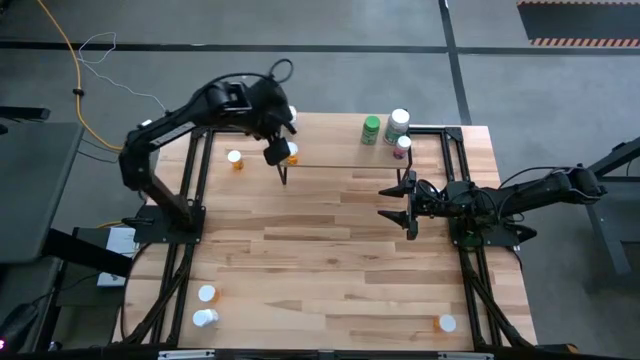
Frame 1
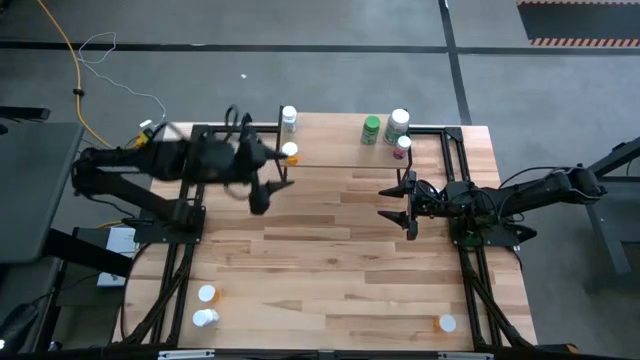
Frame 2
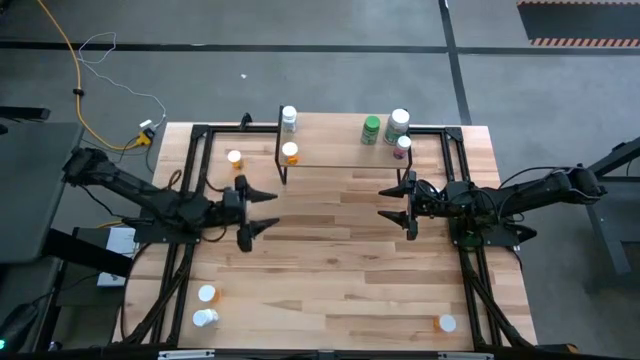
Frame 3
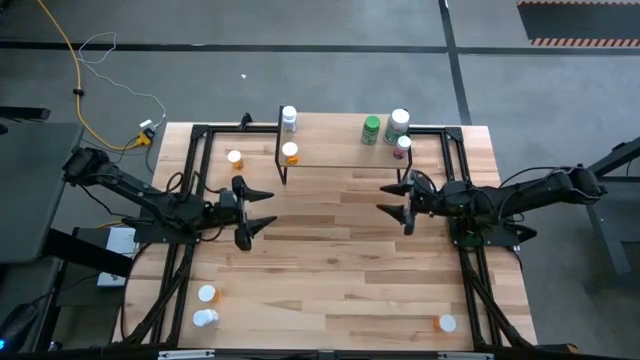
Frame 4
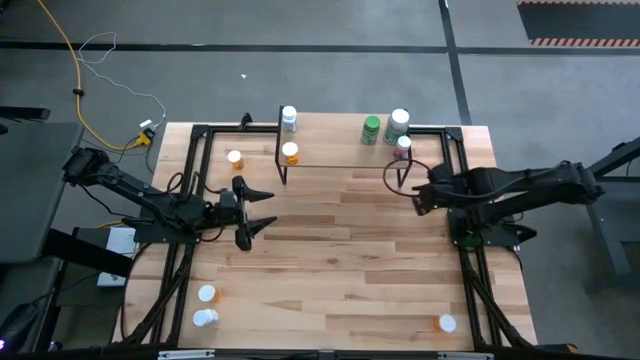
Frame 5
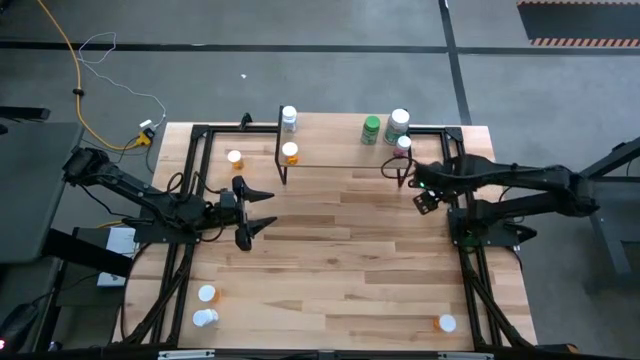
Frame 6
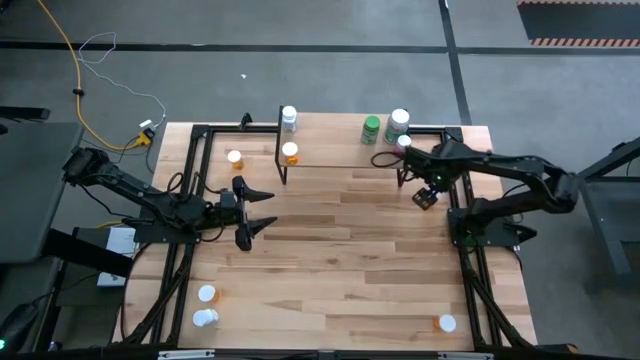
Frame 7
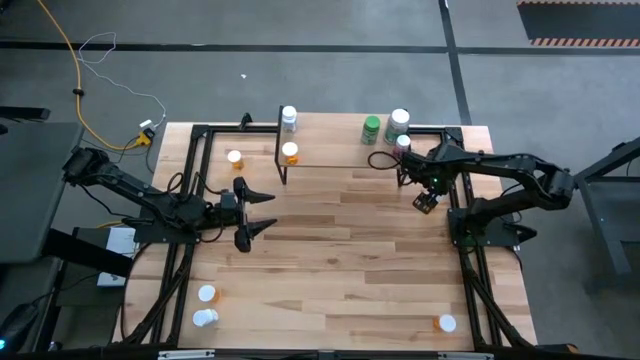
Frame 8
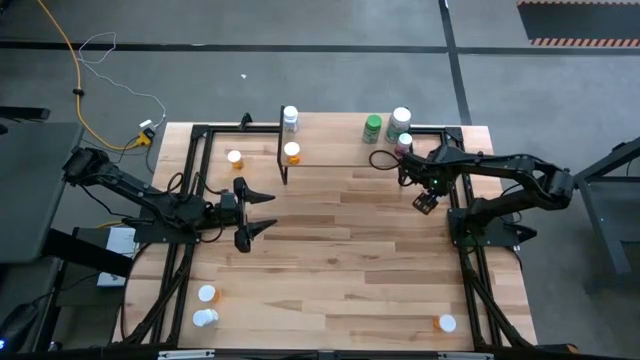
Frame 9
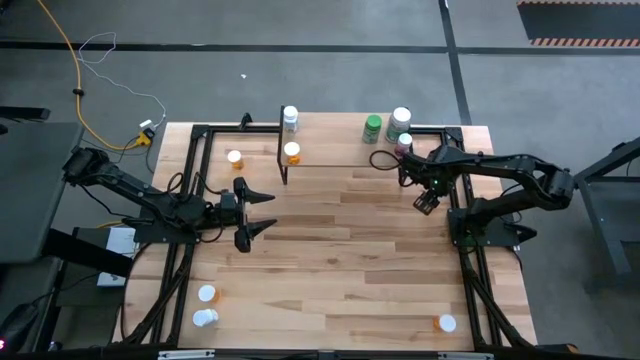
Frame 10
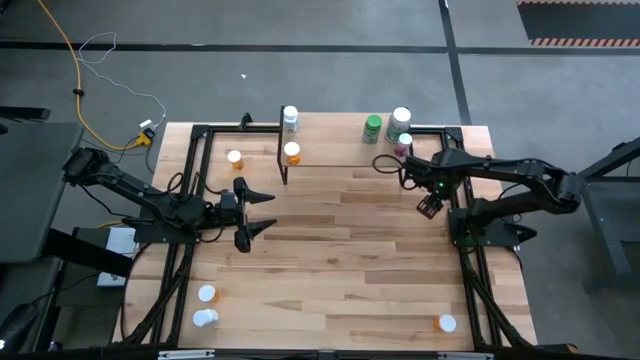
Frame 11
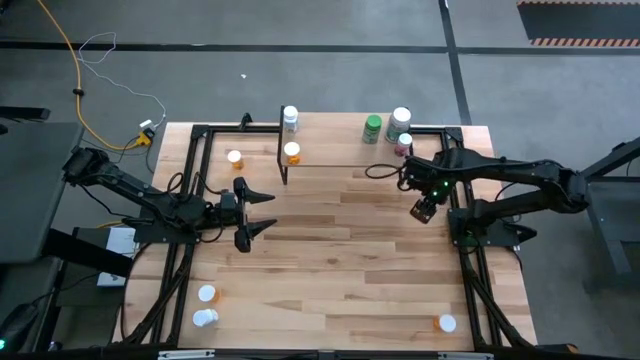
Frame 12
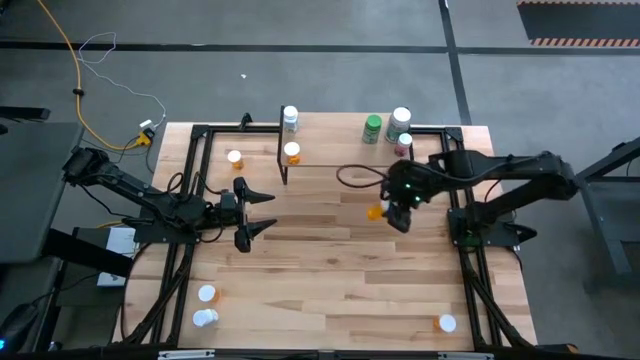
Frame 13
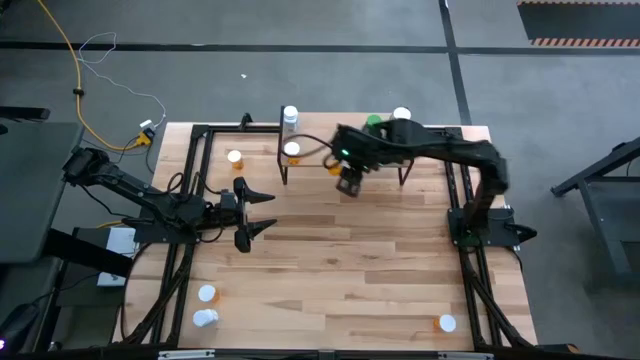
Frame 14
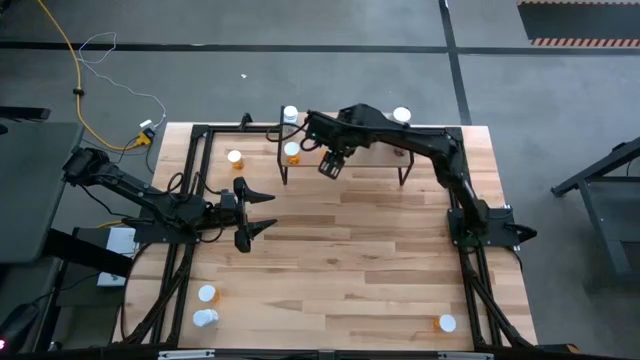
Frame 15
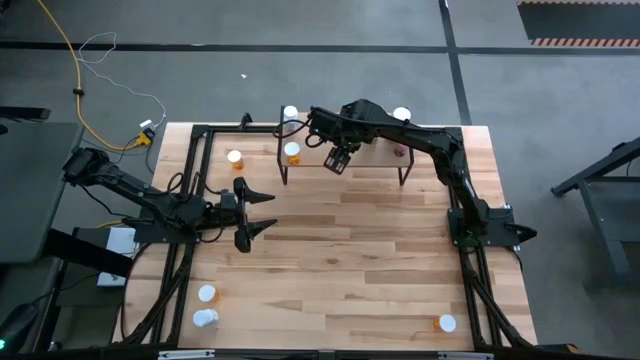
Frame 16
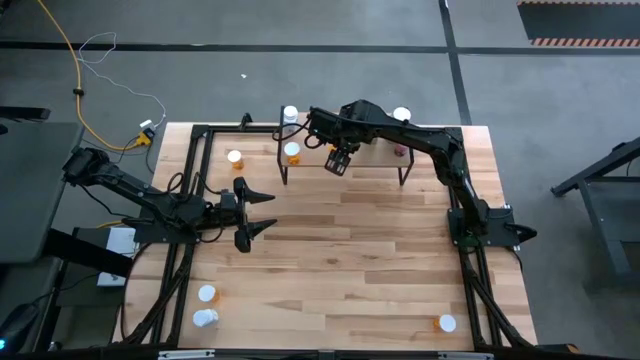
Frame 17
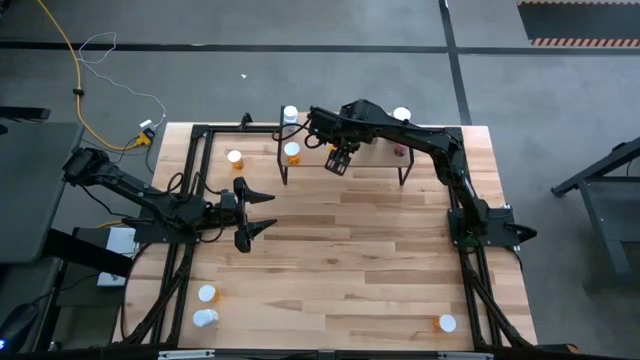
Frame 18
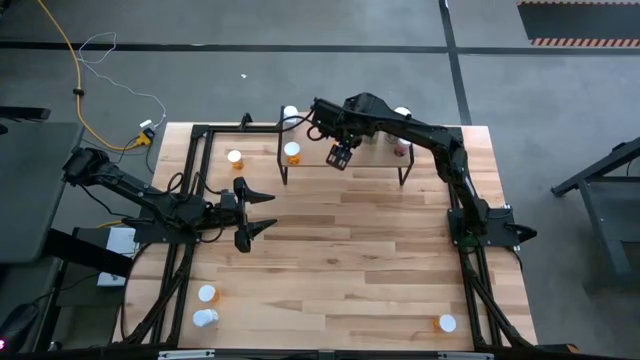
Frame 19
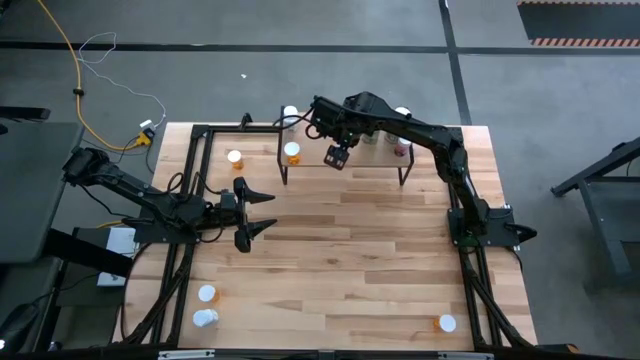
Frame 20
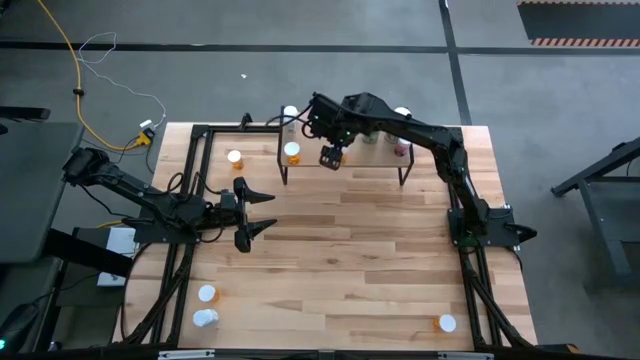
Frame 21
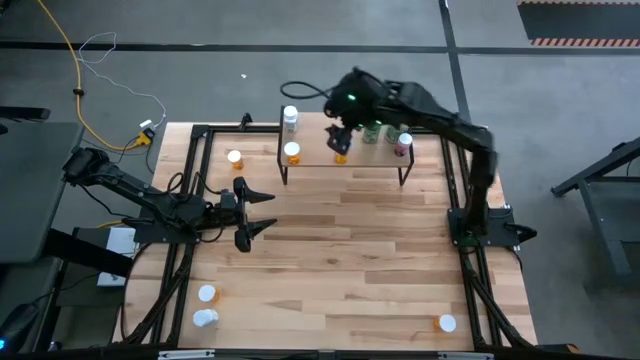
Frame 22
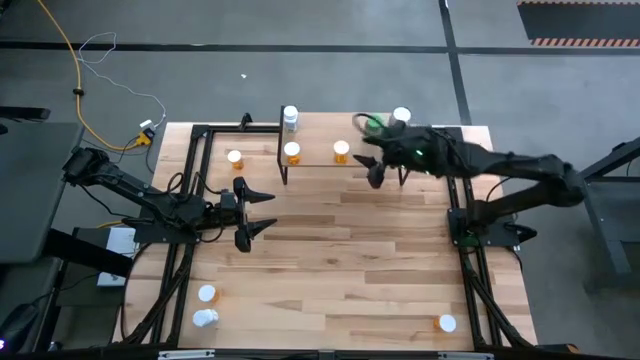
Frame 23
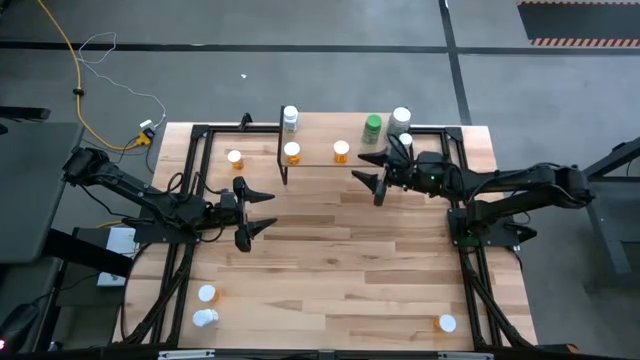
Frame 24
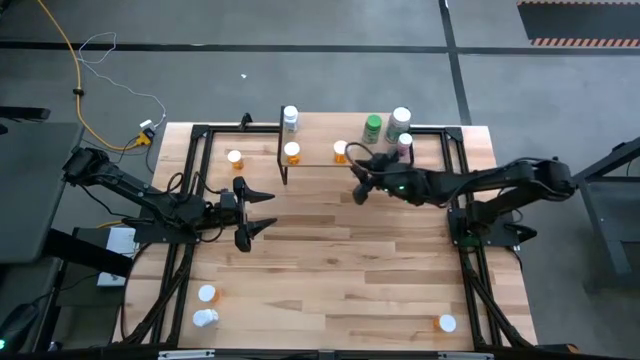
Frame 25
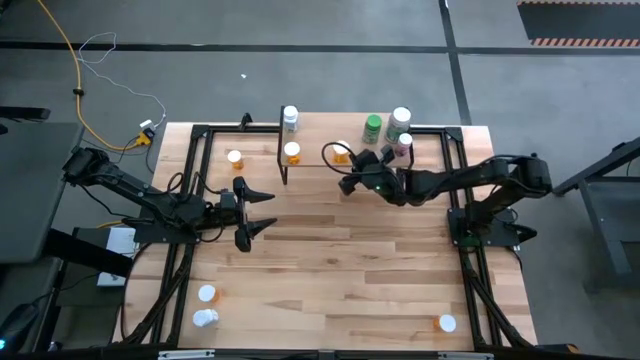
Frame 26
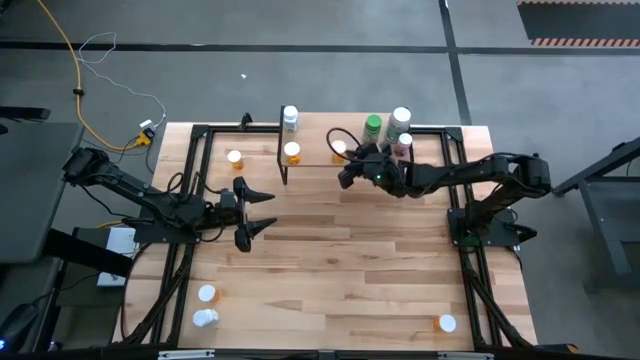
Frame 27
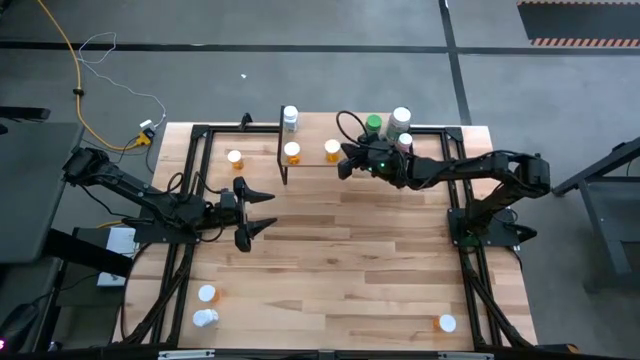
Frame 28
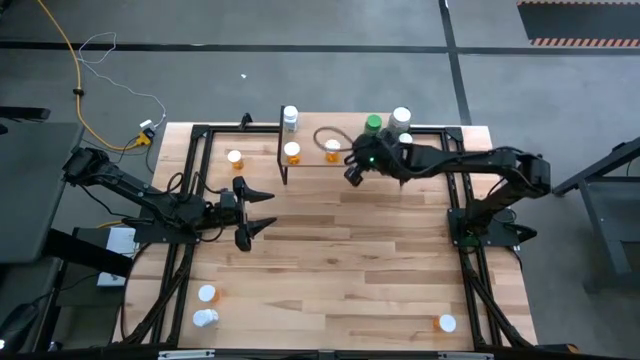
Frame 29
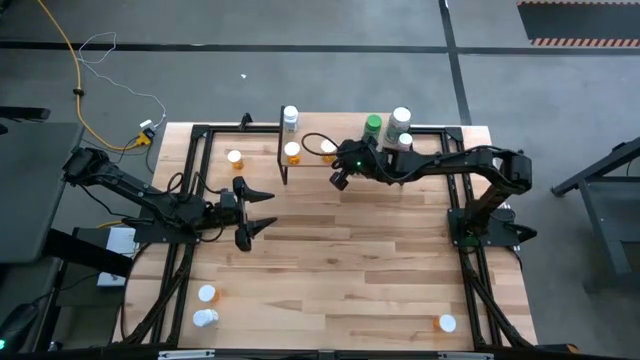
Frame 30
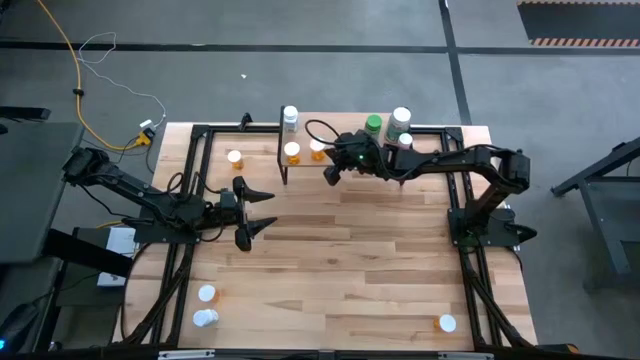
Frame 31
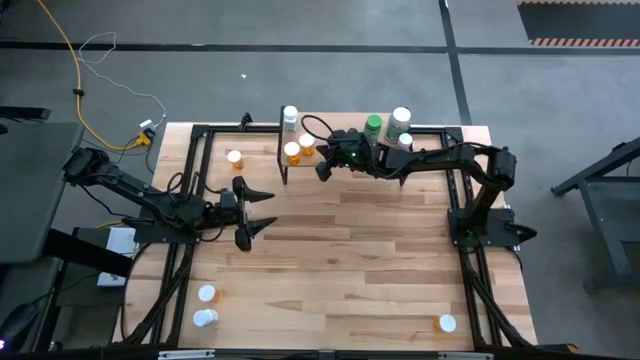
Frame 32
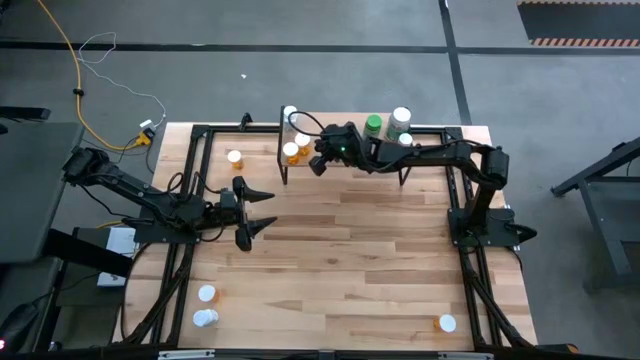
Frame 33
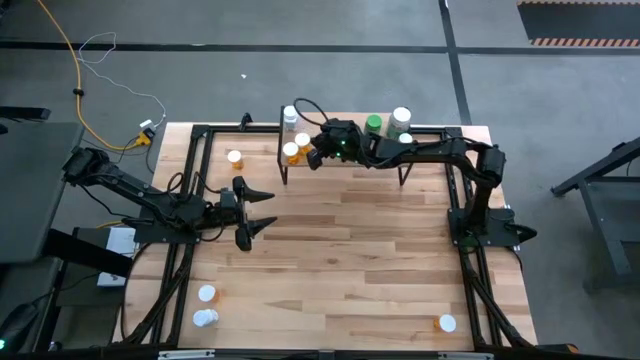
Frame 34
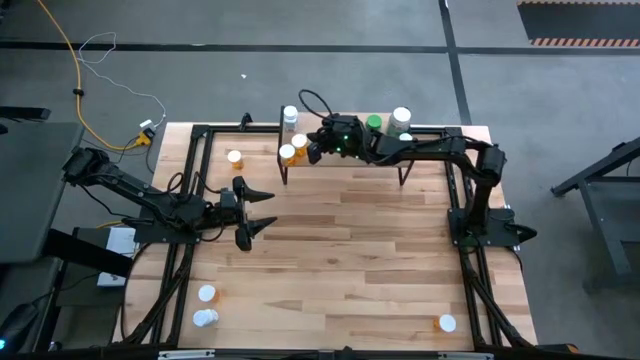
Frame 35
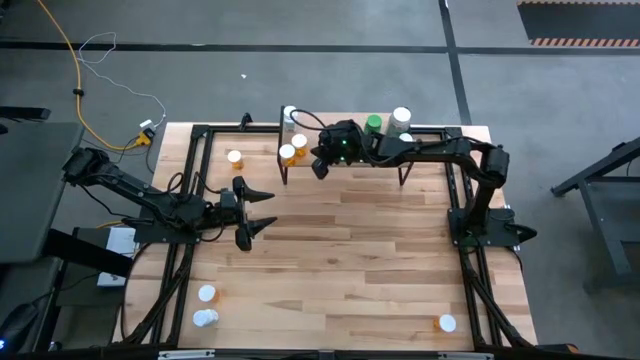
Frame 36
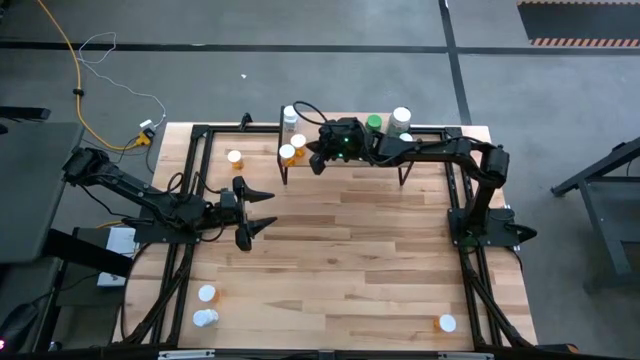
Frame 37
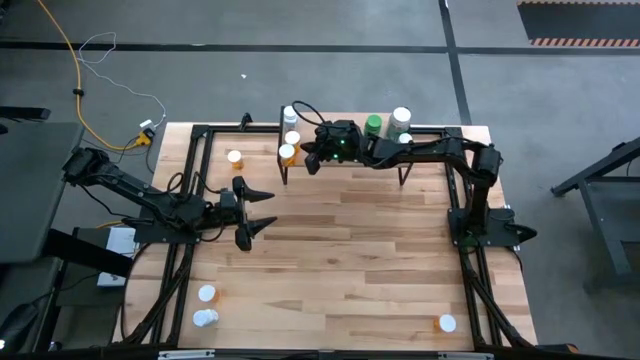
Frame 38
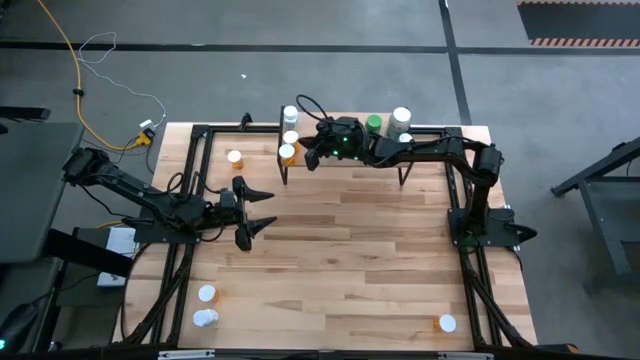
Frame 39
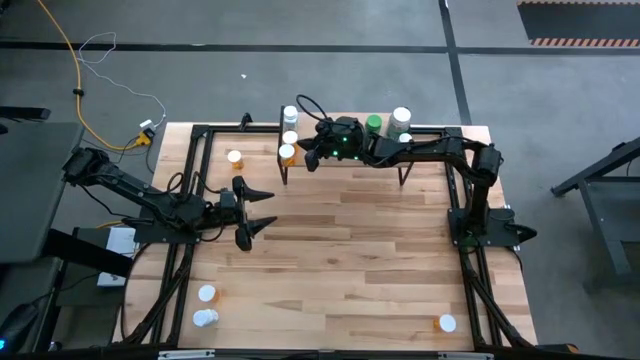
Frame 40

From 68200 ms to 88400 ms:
Task: Pick and place medicine bottles onto shelf by color
Put the orange pill bottle on the shelf

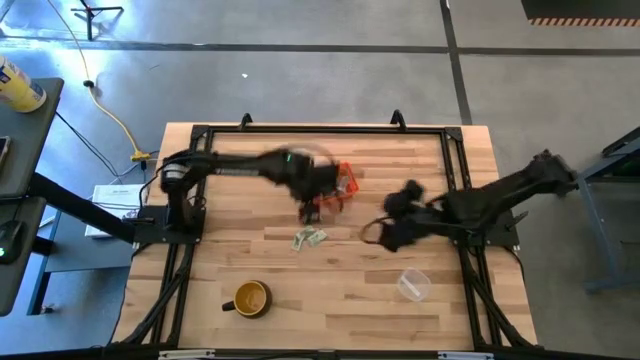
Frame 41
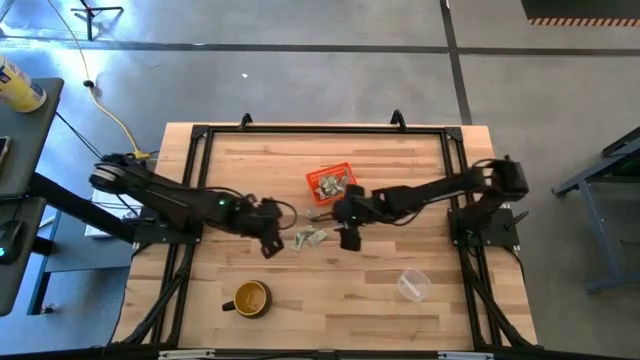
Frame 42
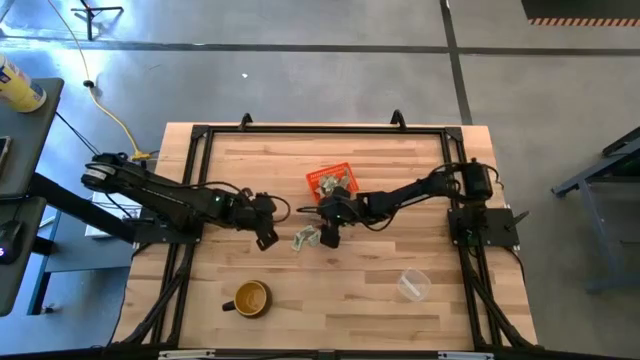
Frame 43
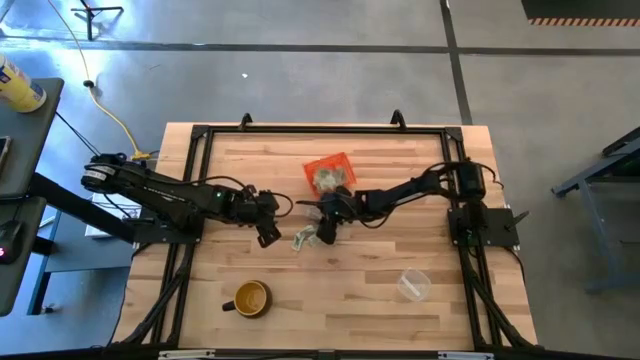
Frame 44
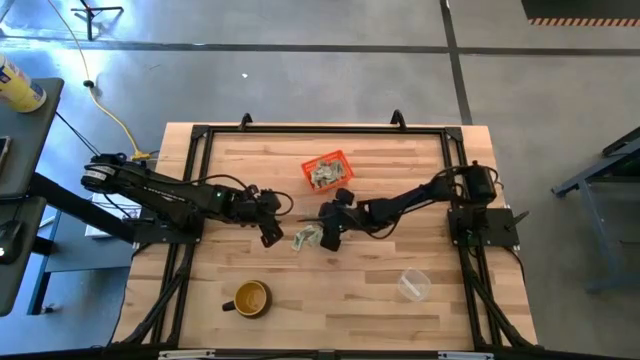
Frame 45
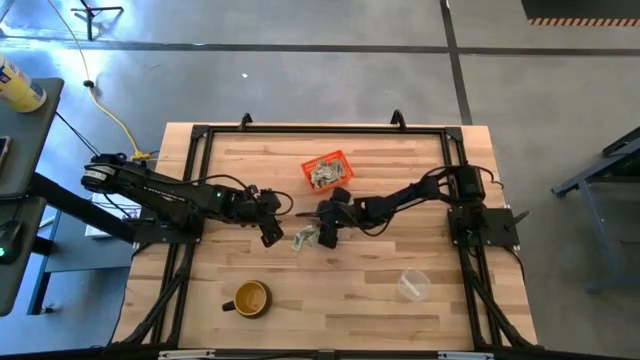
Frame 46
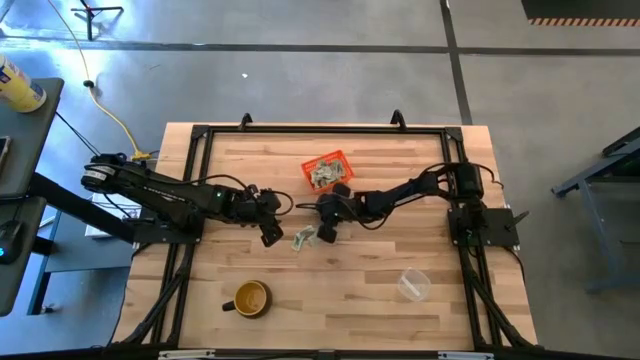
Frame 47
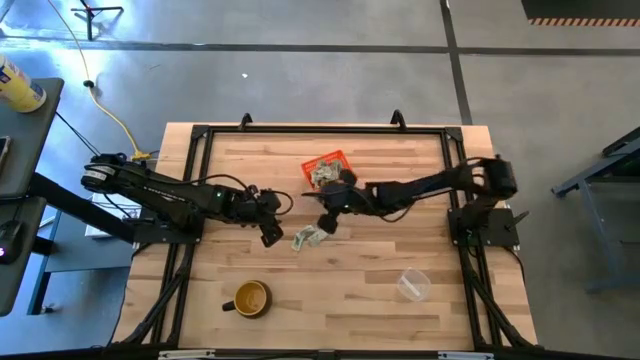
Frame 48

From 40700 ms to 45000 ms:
Task: Pick and place items into bin
Put the white stevia packet into the orange bin
